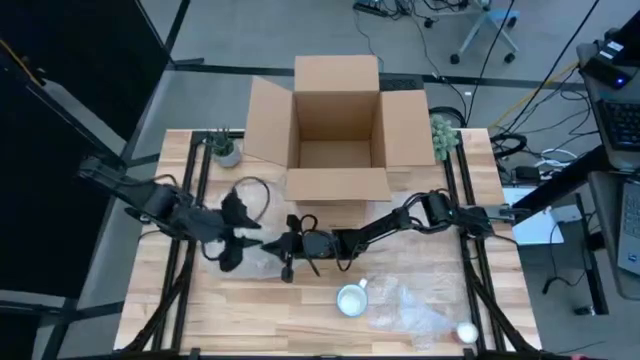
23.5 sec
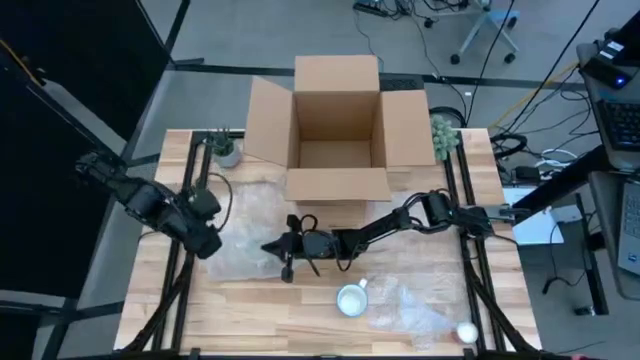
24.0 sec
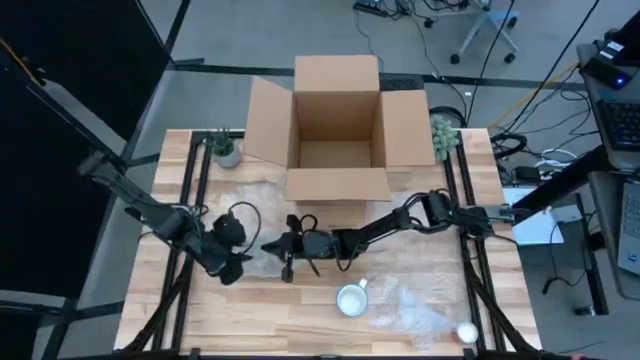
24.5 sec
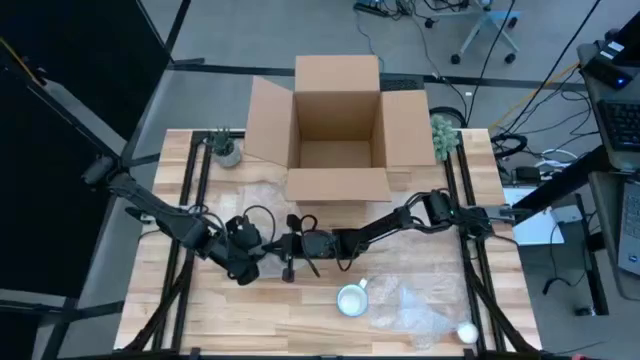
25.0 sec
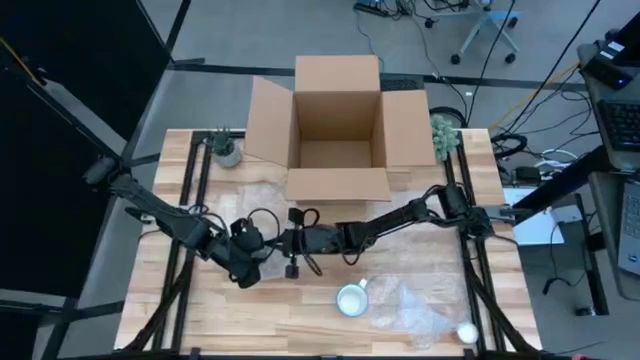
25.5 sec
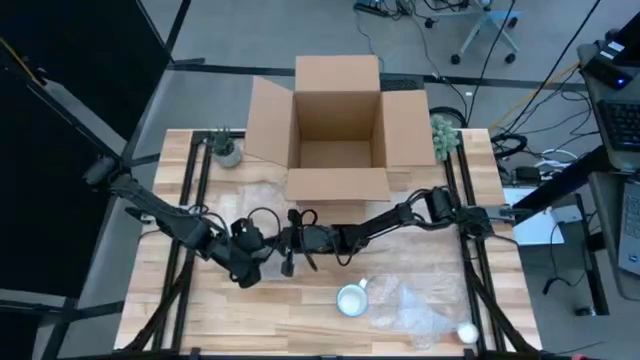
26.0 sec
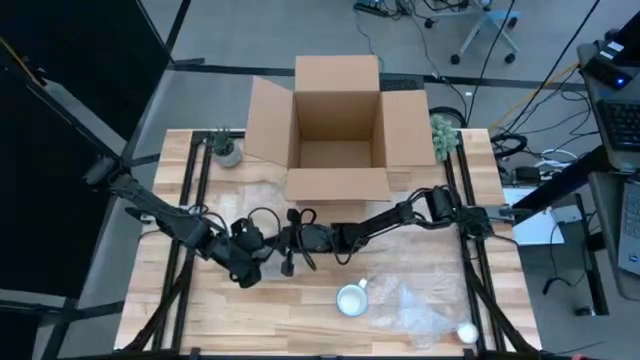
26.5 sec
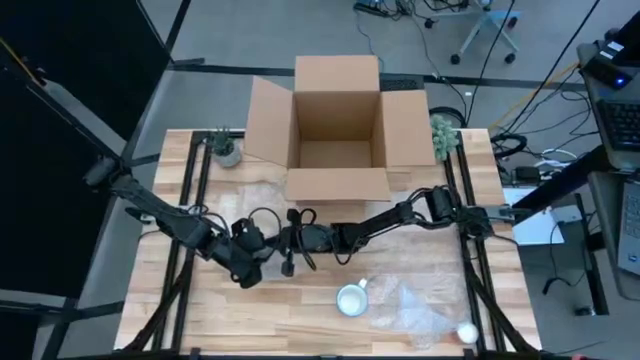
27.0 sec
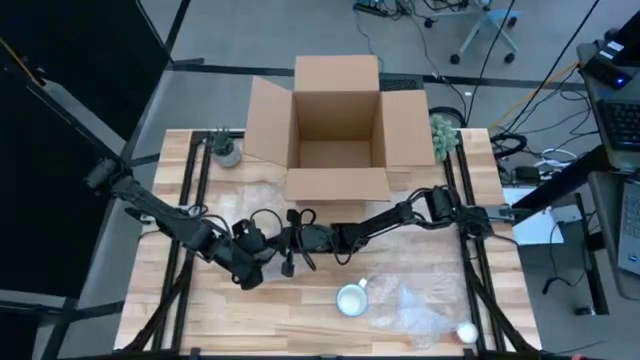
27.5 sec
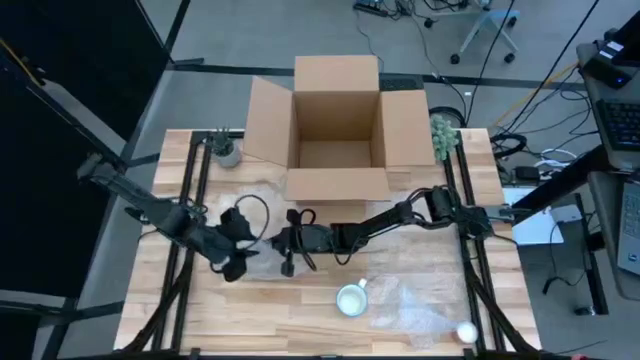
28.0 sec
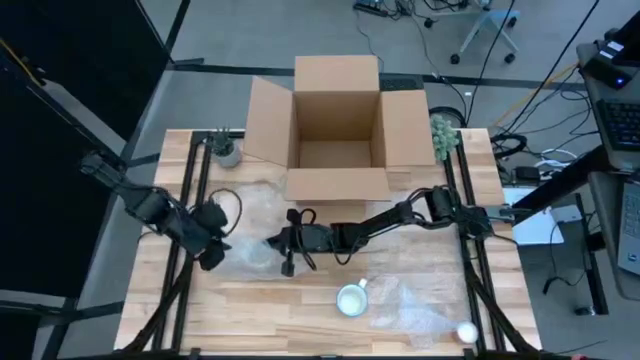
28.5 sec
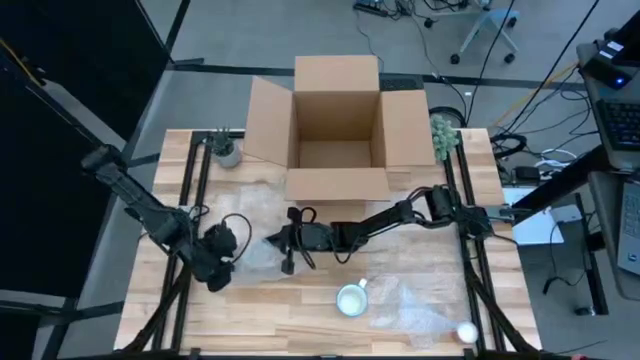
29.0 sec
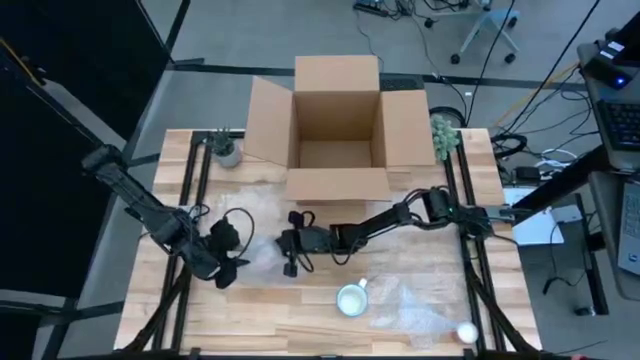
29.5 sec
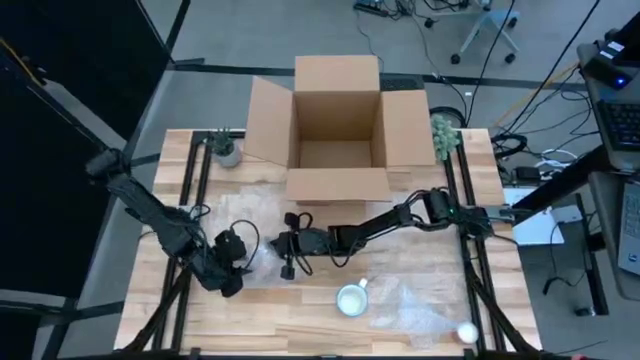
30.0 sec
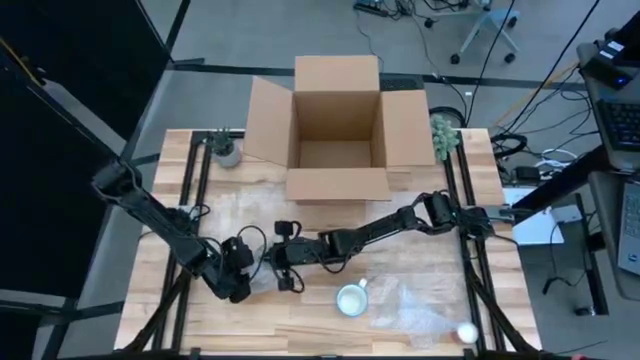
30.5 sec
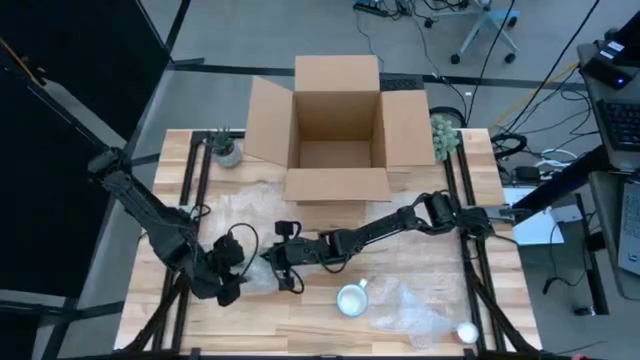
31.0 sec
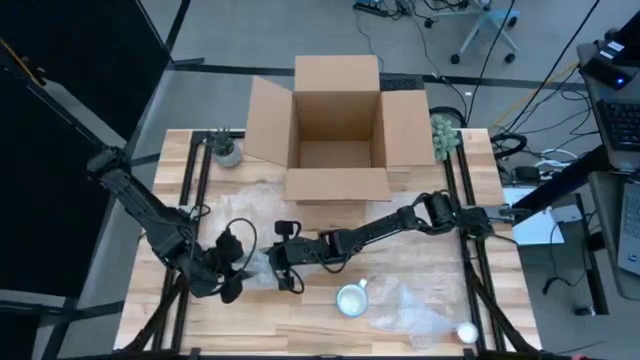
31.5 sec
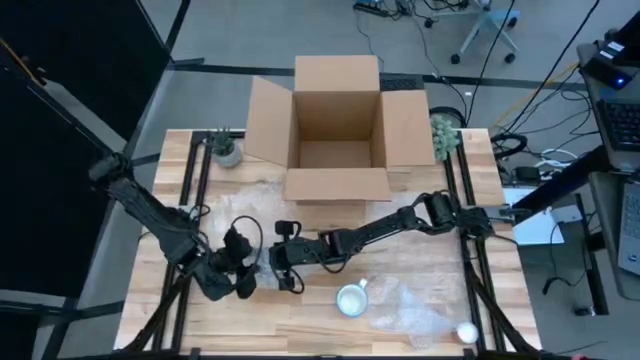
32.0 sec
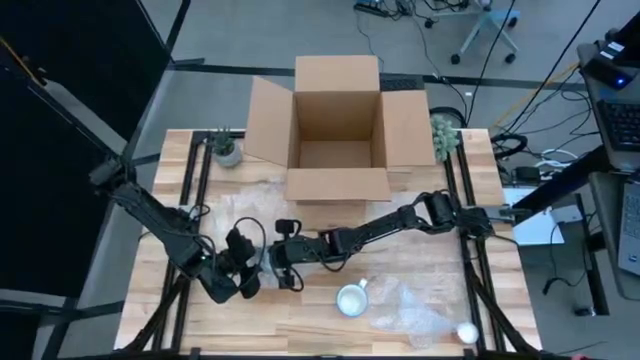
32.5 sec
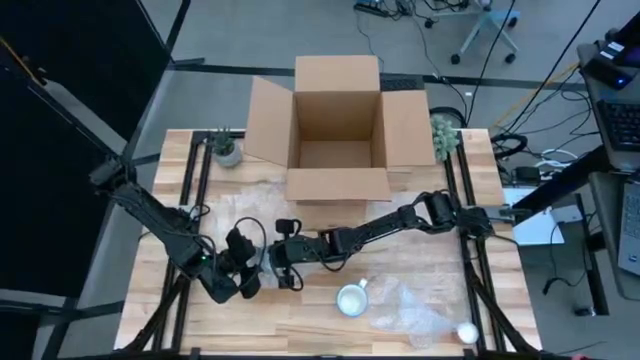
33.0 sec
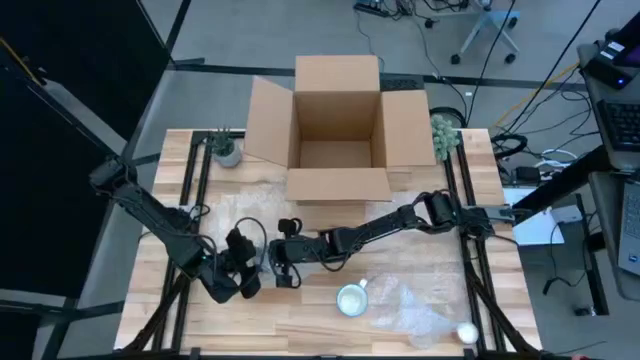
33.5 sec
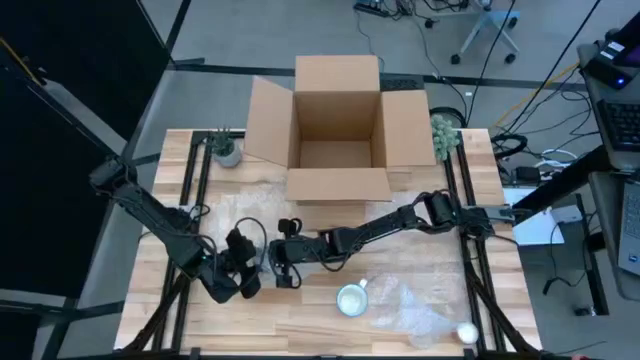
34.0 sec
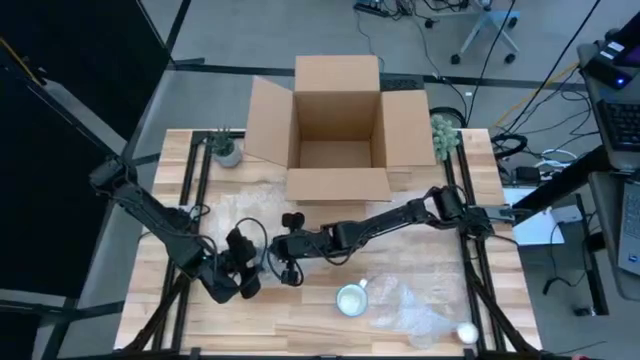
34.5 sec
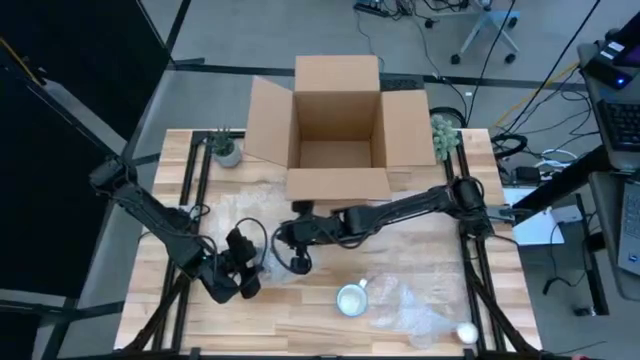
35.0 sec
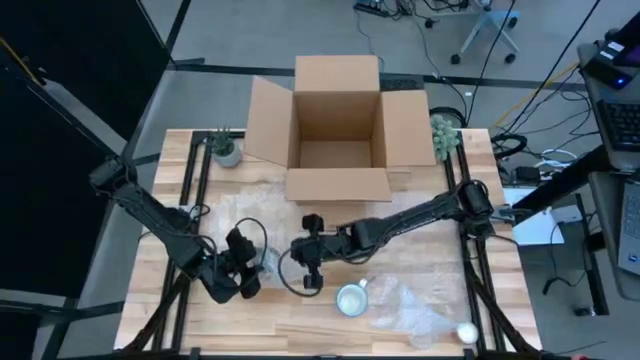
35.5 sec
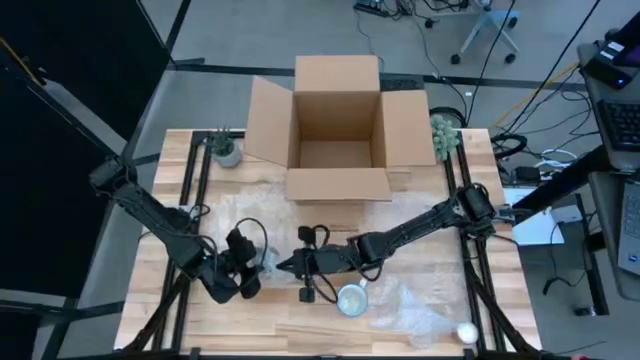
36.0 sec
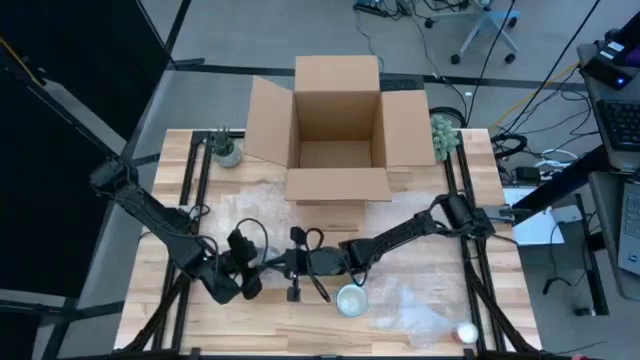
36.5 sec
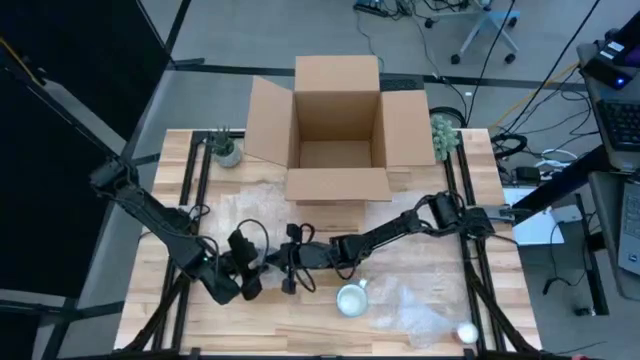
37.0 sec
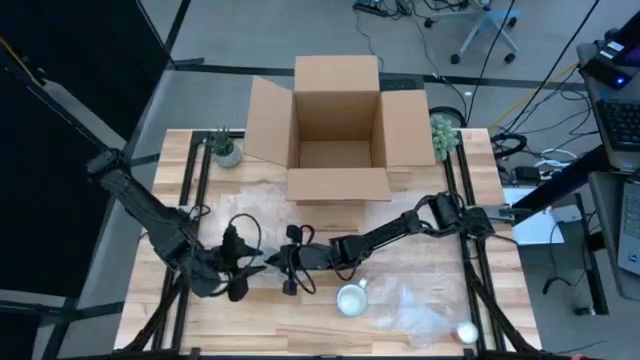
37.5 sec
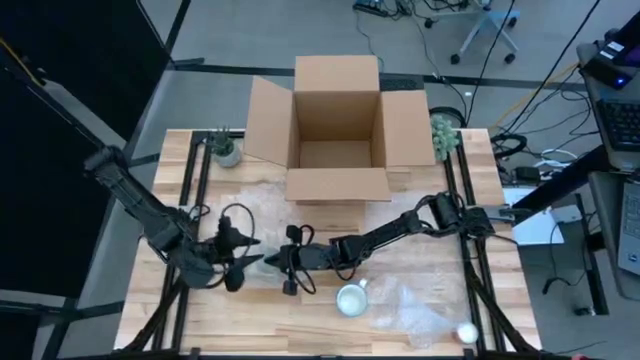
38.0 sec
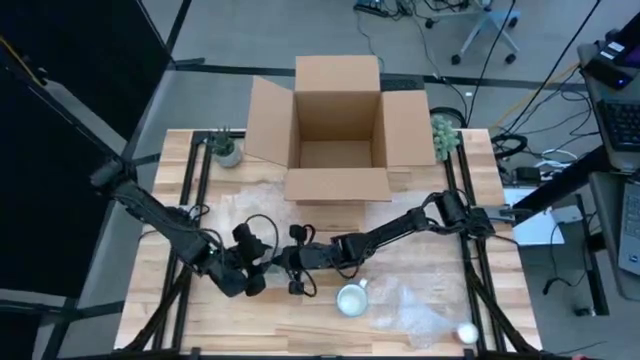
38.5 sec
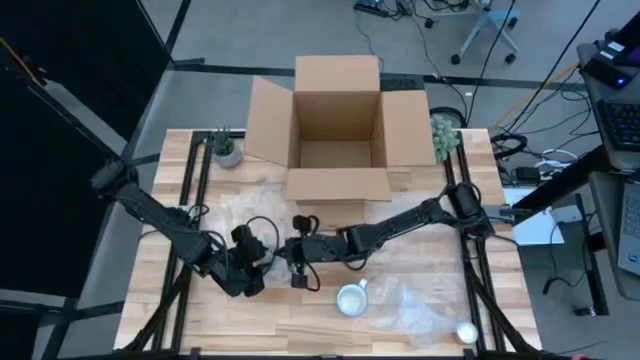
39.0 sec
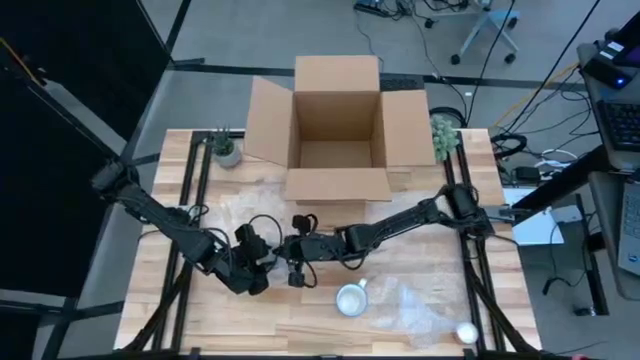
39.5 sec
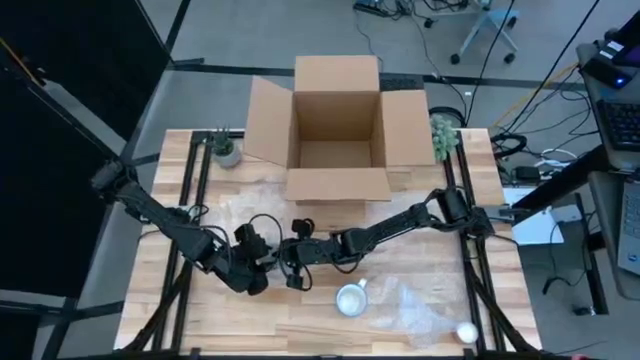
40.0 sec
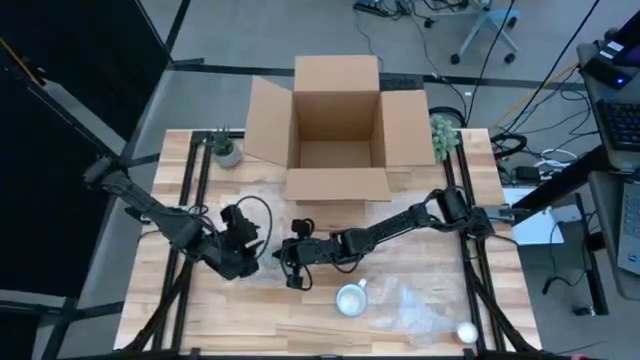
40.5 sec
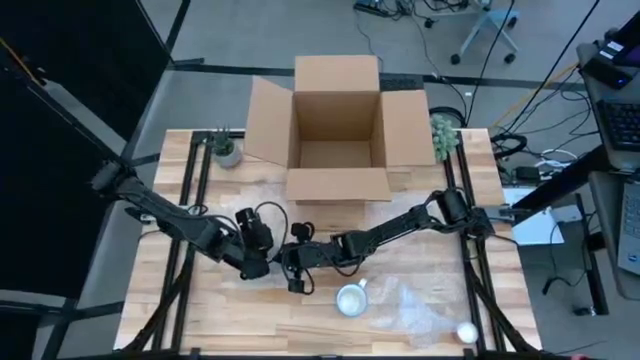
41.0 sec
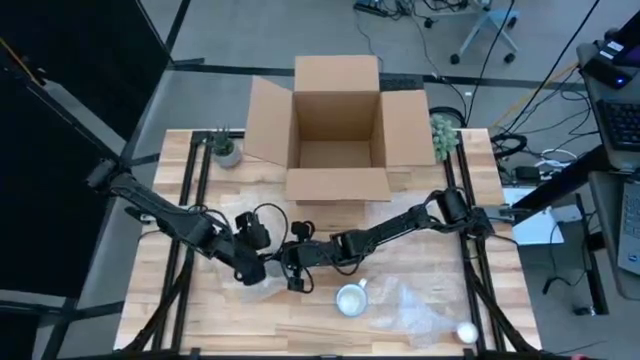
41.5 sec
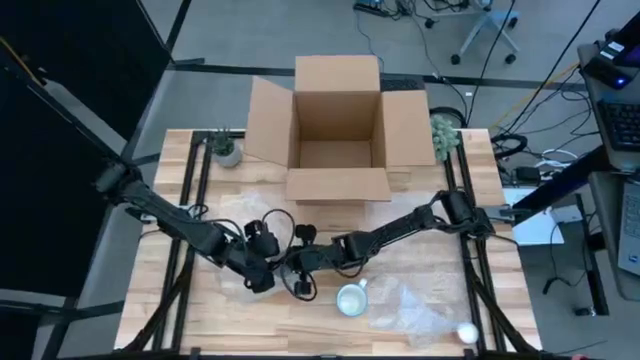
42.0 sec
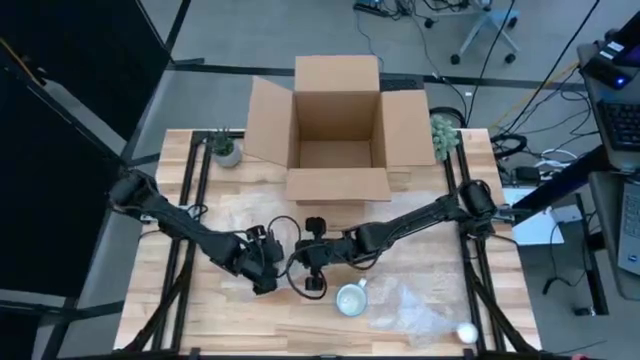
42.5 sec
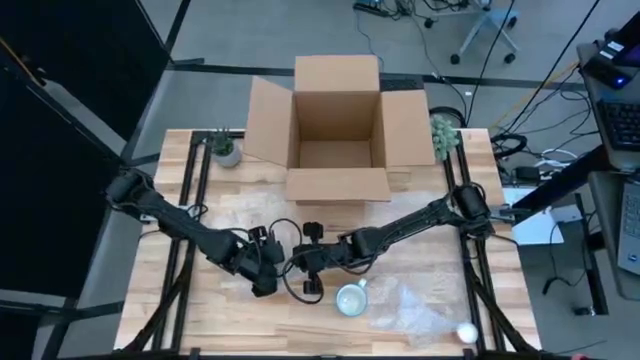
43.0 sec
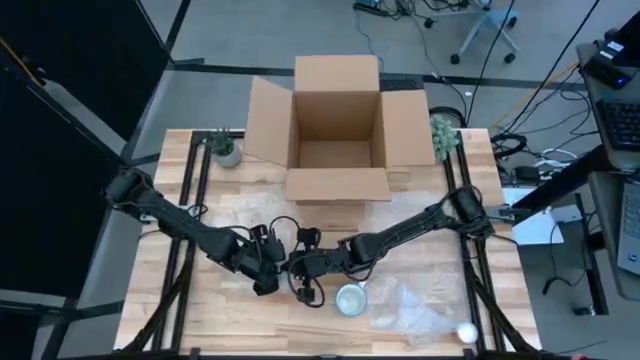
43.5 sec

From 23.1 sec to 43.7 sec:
Task: wrap mug
Wrap the yellow mug with the left bubble wrap

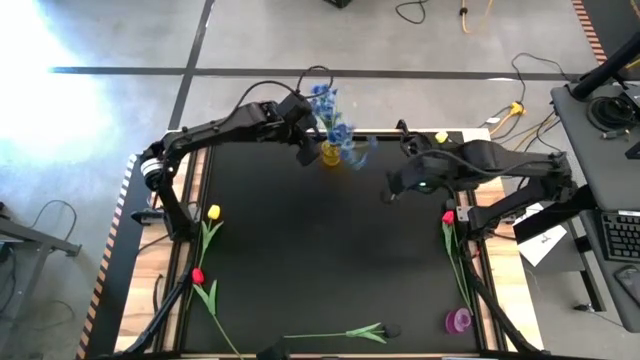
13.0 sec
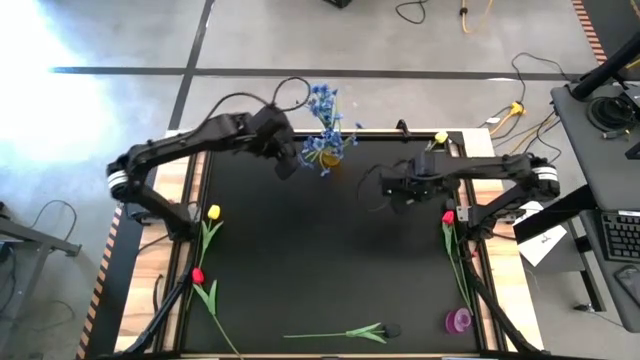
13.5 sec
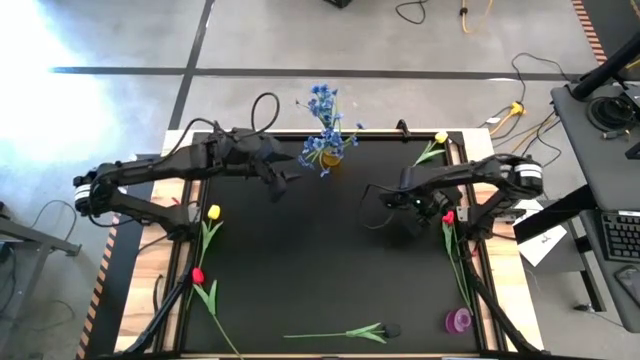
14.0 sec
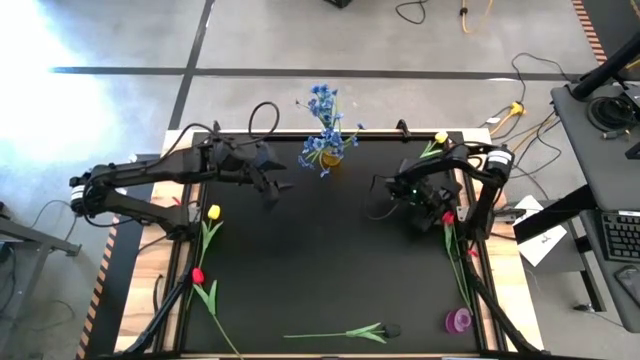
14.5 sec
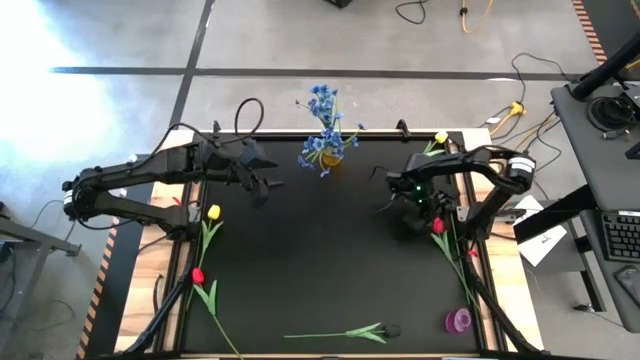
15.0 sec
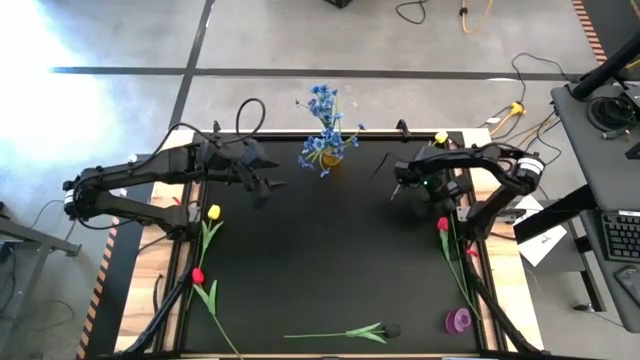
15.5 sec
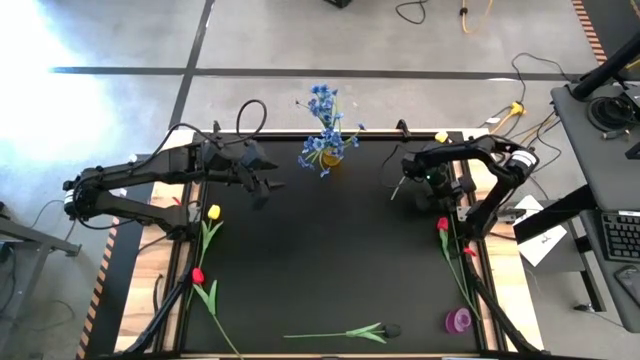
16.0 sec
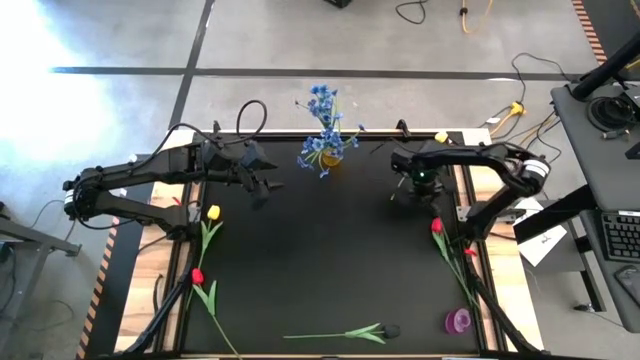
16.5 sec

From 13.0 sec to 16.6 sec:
Task: Sort flowers into vase by color
Put the top black flower into the yellow vase
